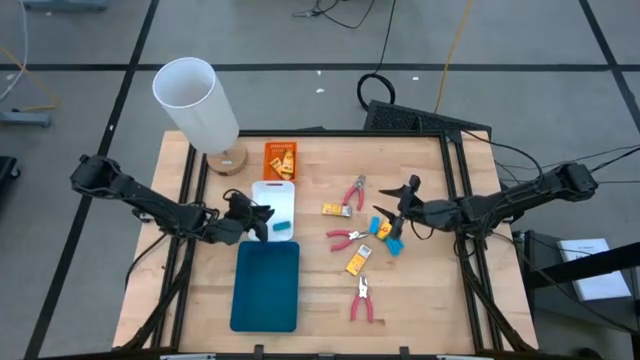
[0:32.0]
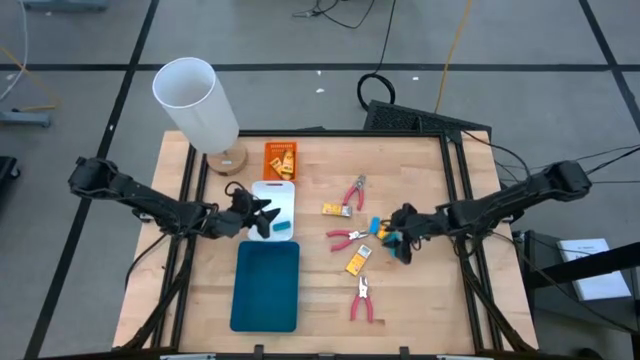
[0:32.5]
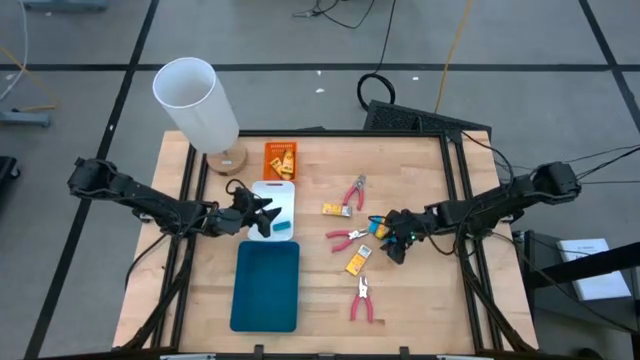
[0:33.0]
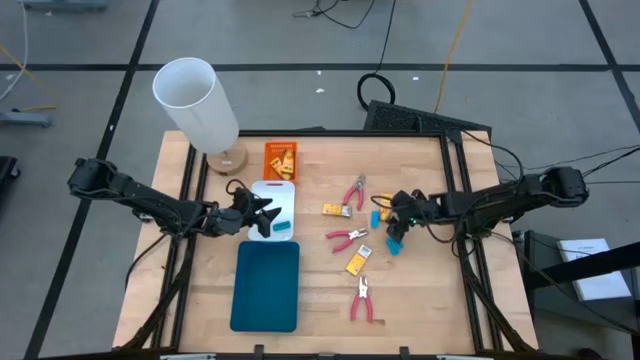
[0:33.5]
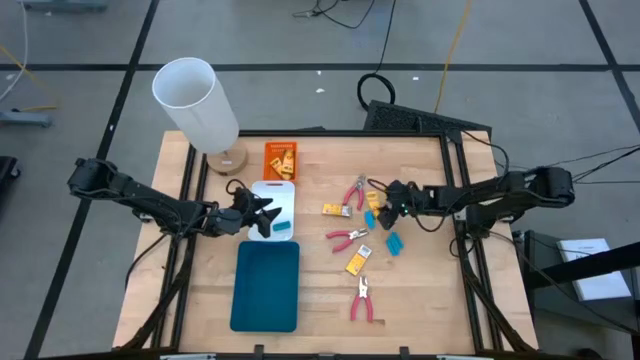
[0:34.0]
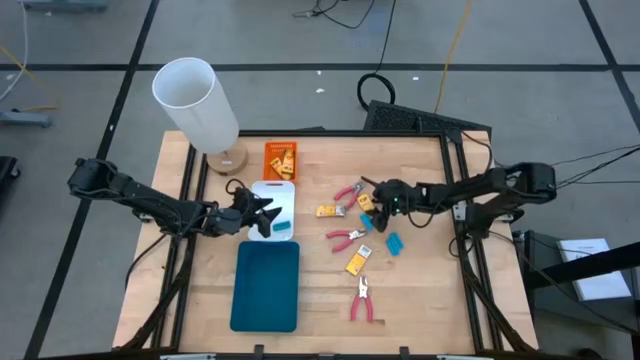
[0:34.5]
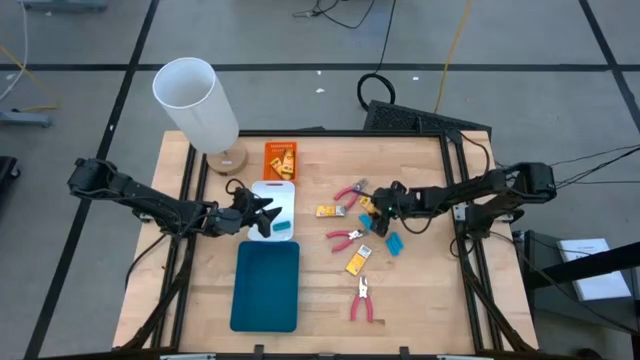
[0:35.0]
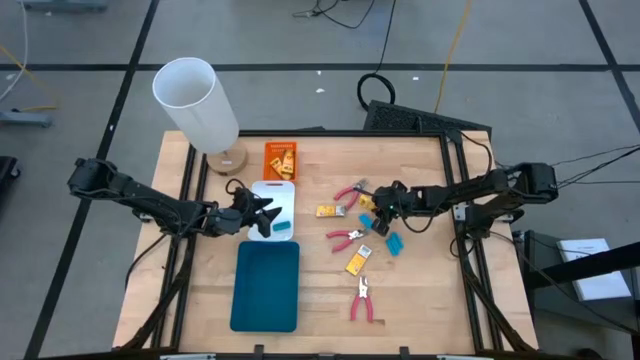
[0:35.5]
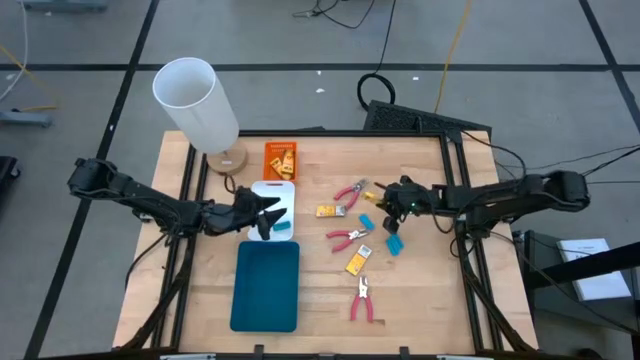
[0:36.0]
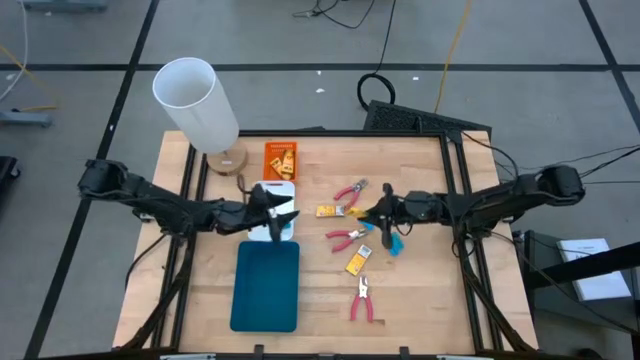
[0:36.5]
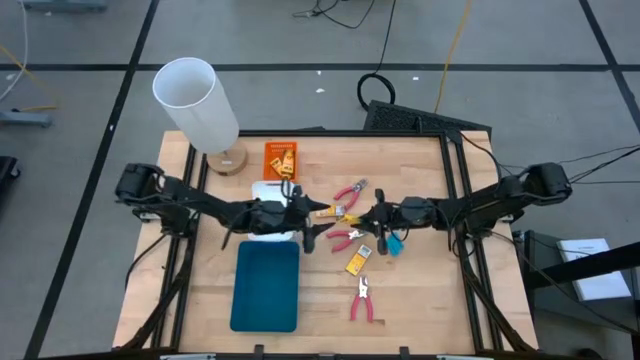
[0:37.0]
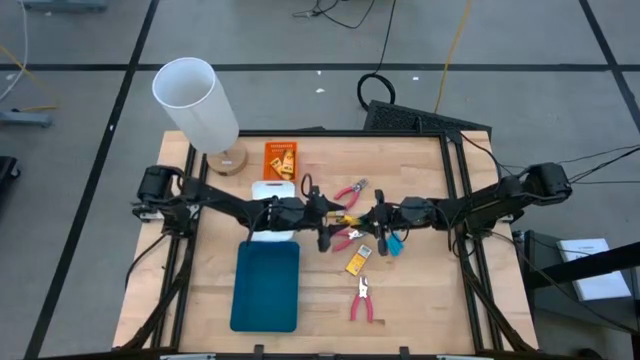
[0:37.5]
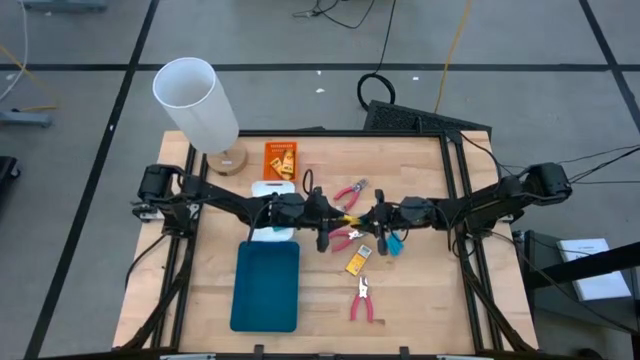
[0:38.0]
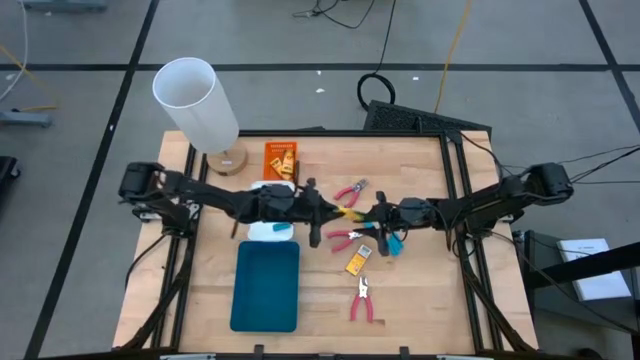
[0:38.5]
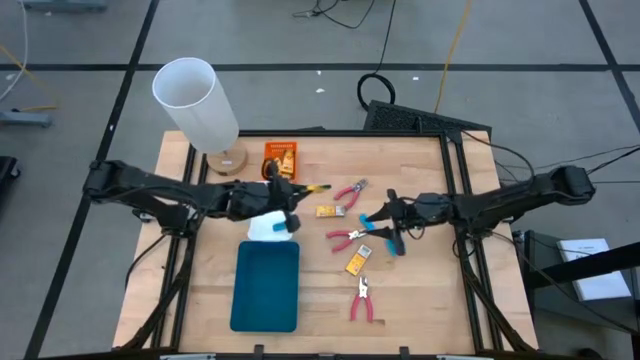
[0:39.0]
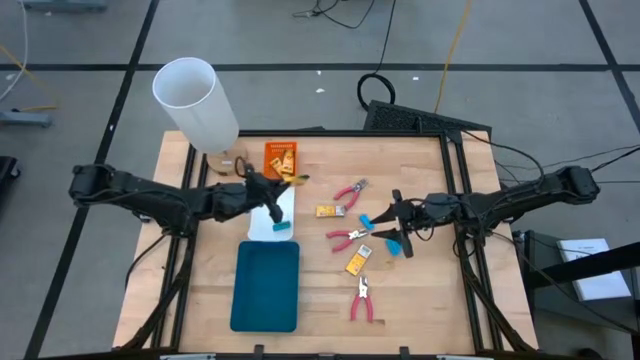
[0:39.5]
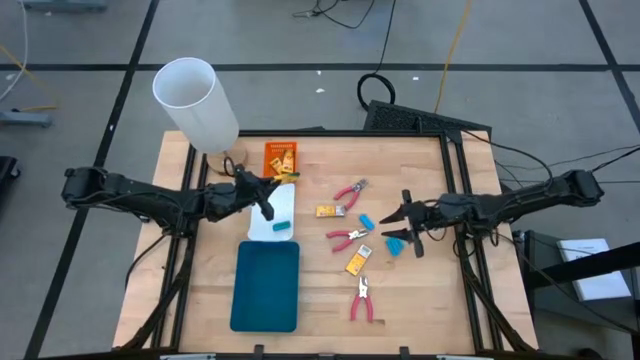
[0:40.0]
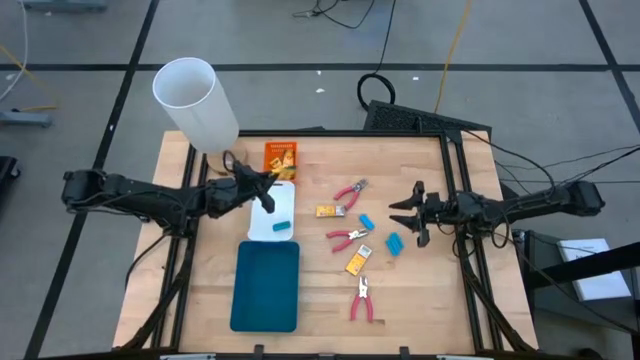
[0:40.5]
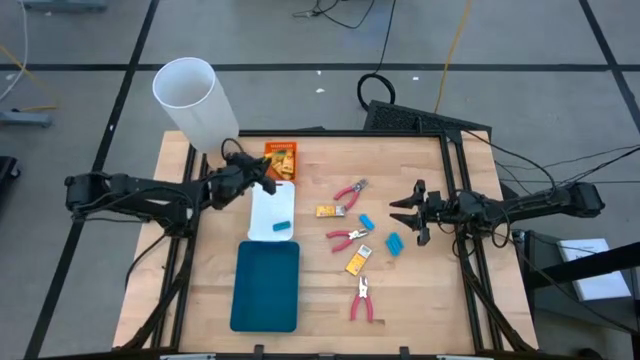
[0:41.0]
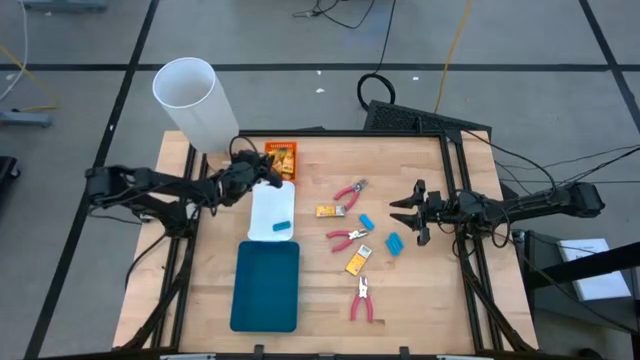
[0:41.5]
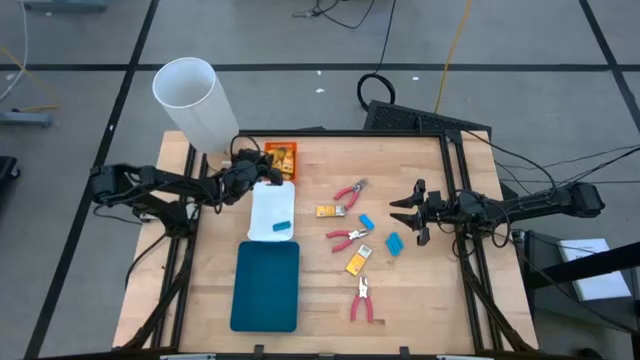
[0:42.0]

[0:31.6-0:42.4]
Task: Pick & Place School Supplies
Put the yellow crayon box into the orange bin

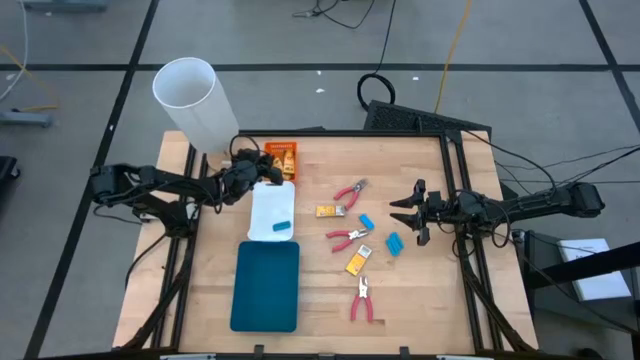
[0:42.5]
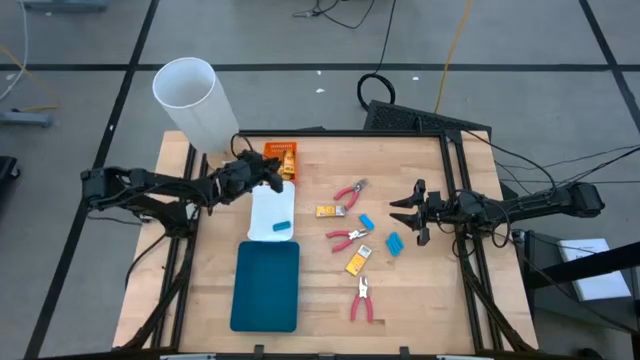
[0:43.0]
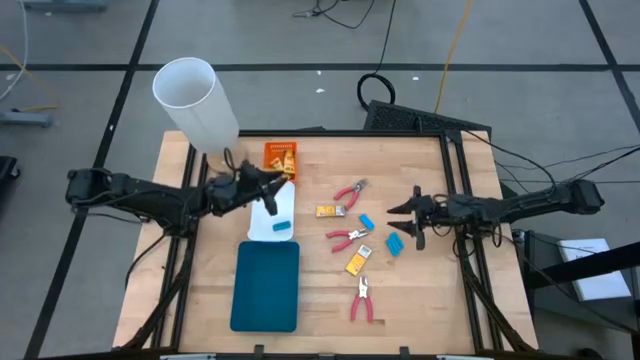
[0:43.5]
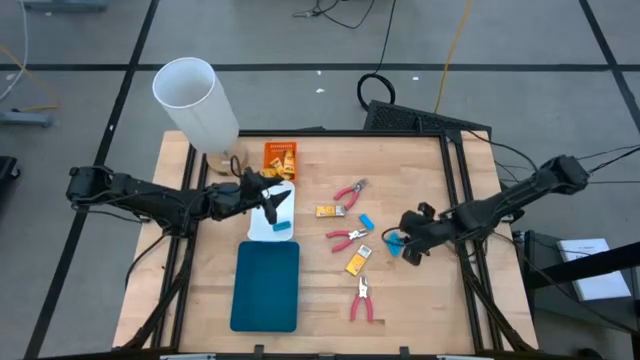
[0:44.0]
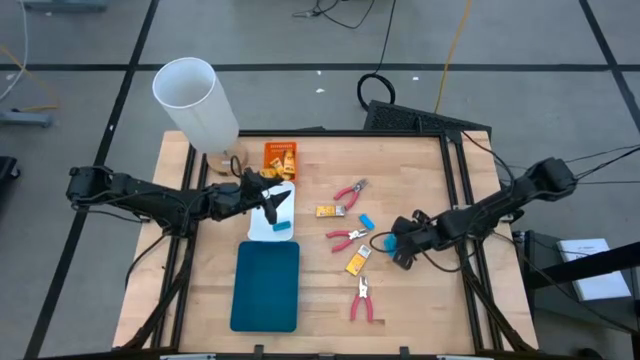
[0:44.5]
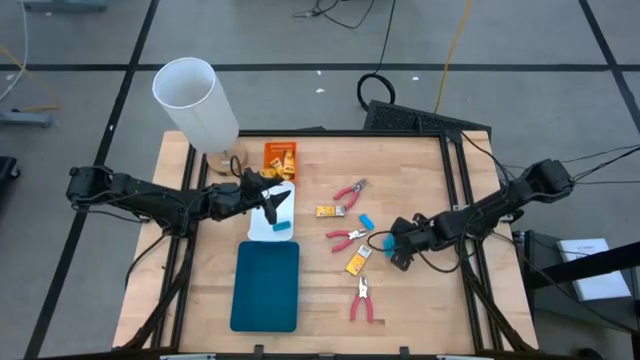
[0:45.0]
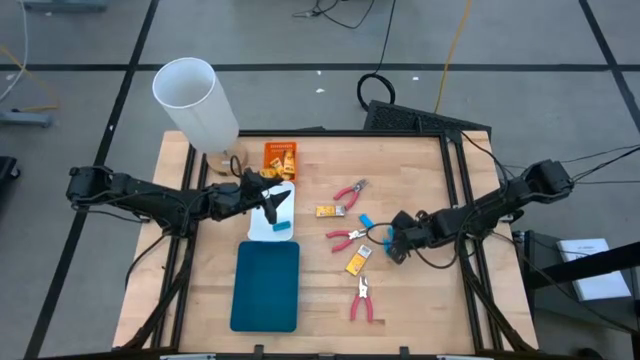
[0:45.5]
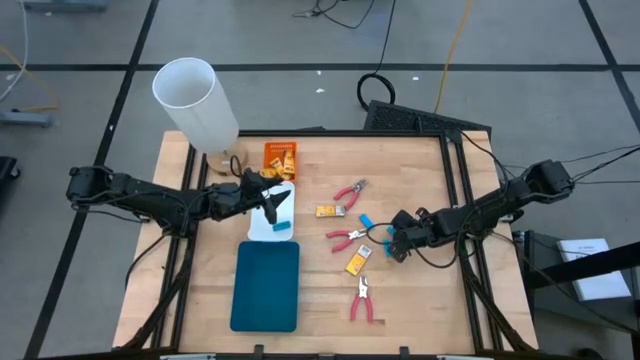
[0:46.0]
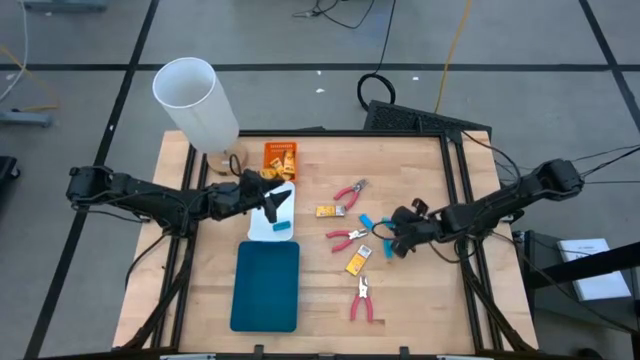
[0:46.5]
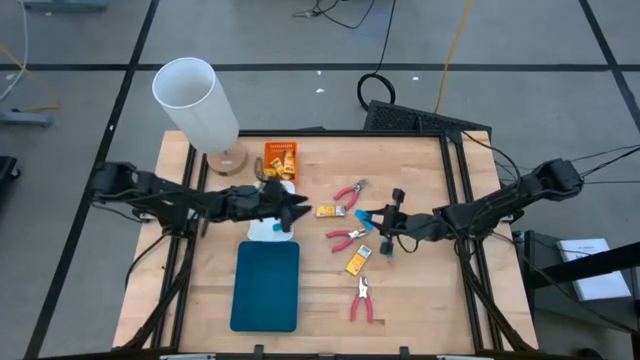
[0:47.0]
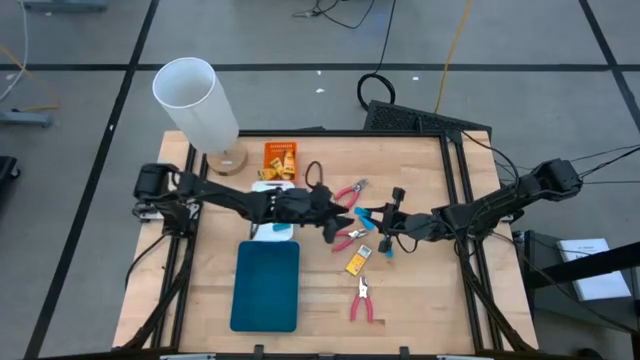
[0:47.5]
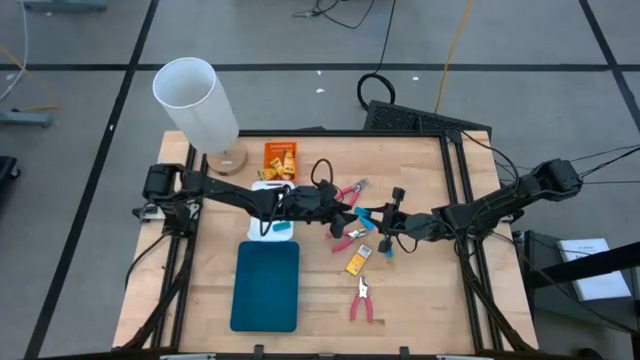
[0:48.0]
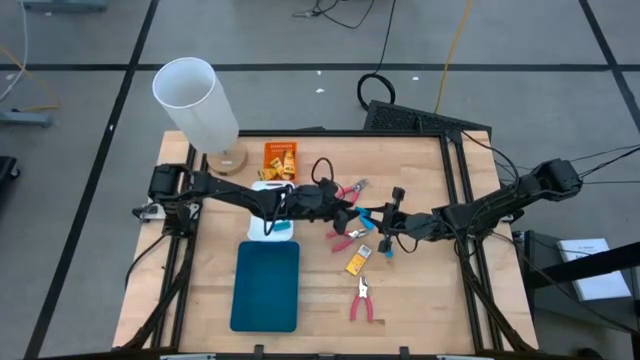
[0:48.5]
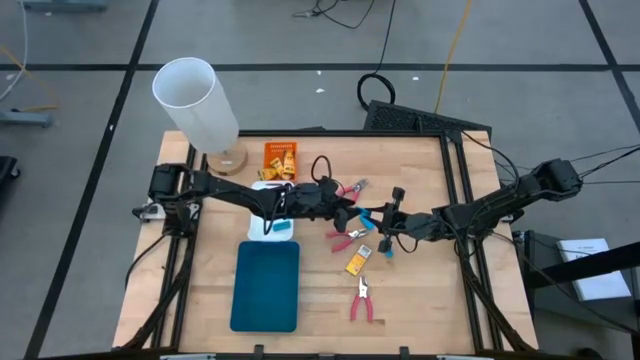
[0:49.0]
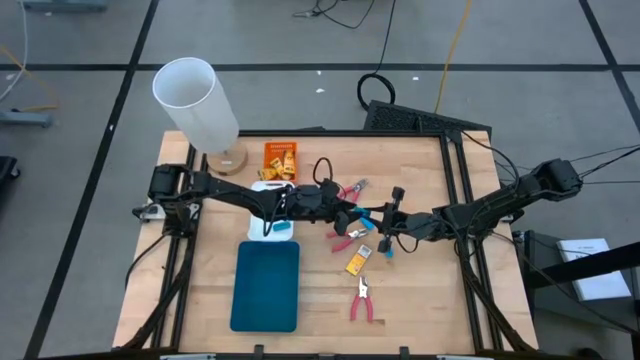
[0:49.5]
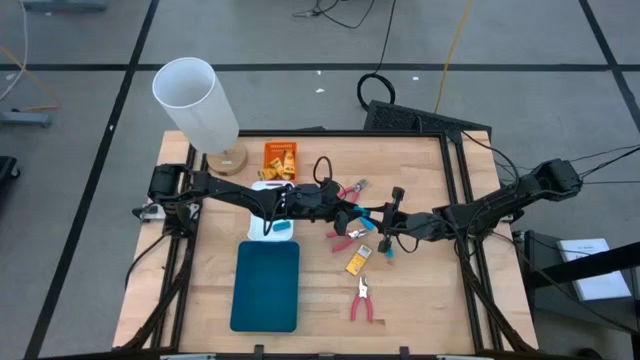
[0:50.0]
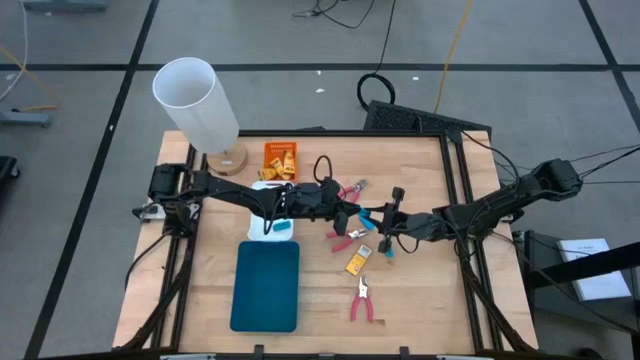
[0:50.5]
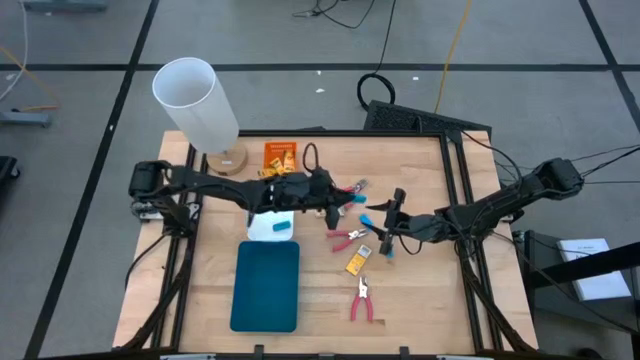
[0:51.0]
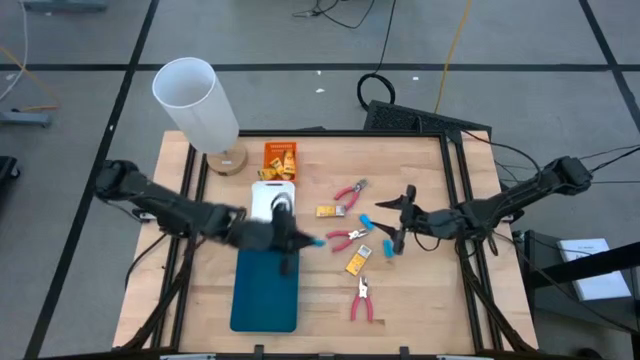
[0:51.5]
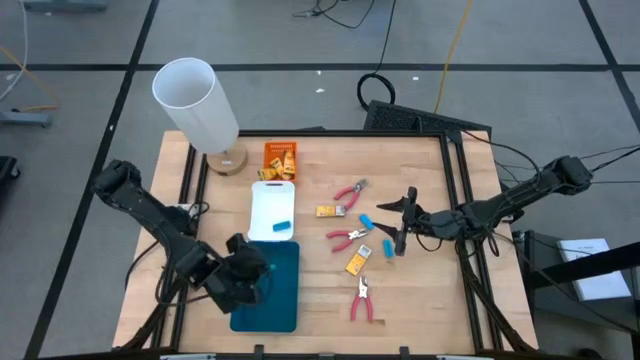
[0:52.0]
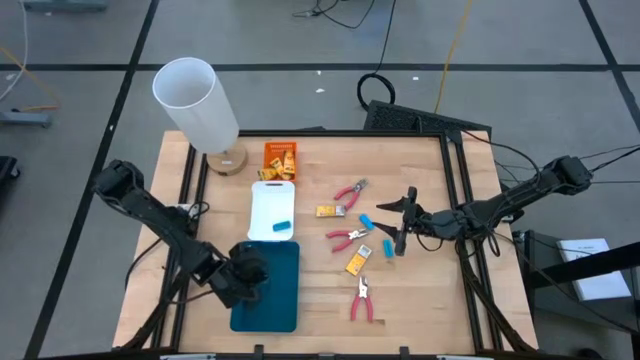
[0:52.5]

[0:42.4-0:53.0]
Put the blue eraser into the white bin
